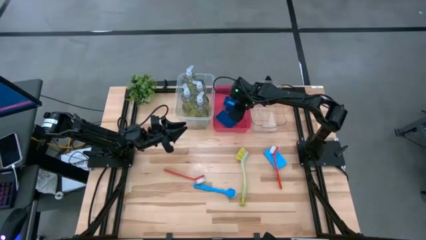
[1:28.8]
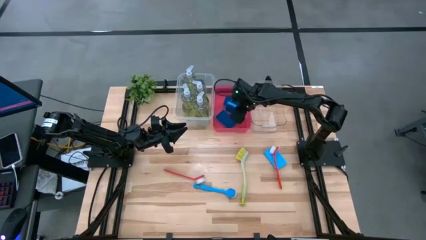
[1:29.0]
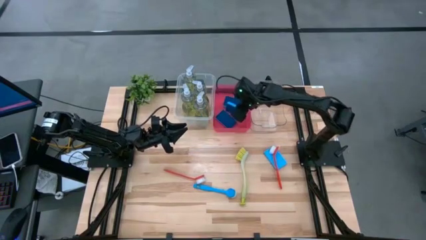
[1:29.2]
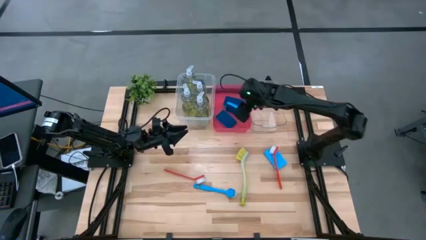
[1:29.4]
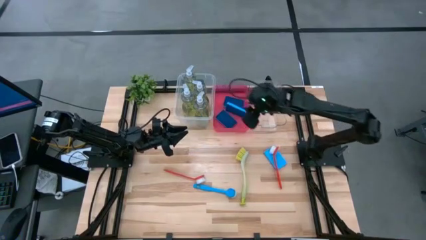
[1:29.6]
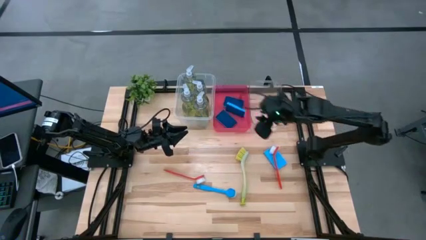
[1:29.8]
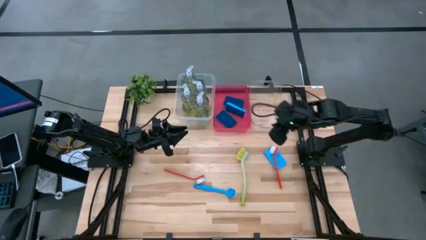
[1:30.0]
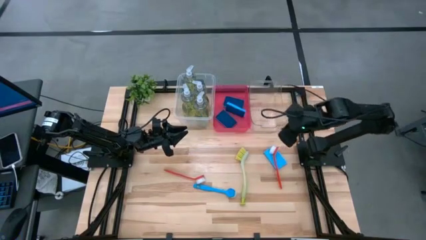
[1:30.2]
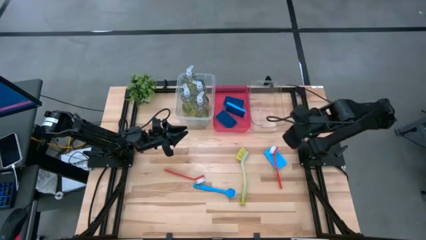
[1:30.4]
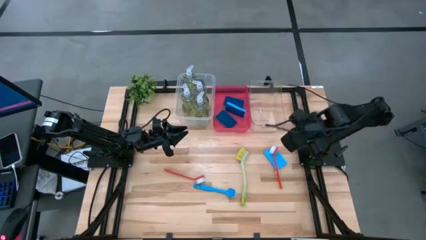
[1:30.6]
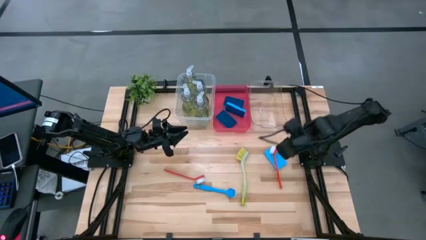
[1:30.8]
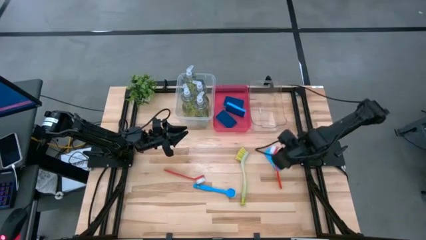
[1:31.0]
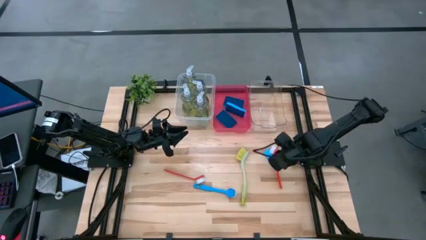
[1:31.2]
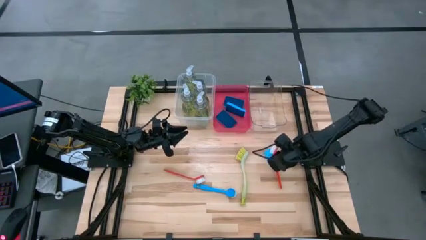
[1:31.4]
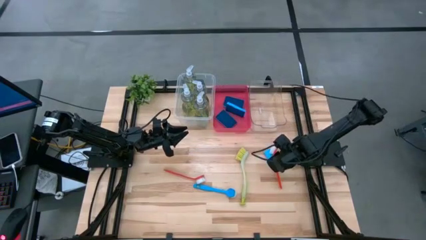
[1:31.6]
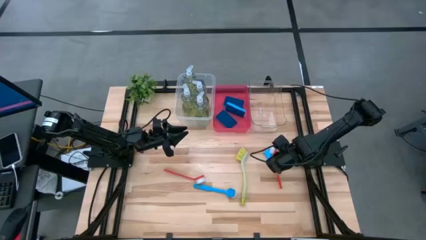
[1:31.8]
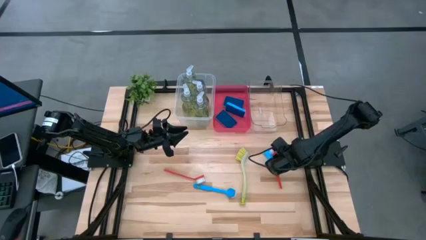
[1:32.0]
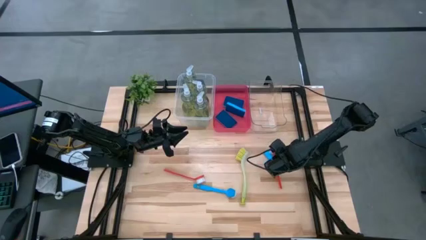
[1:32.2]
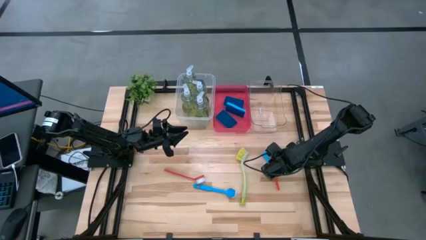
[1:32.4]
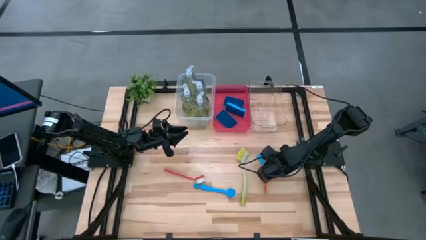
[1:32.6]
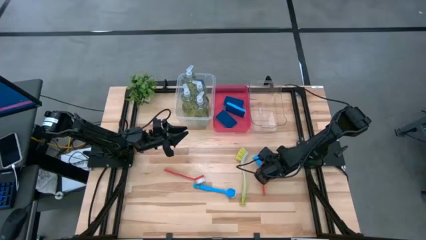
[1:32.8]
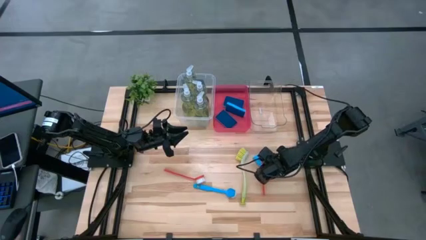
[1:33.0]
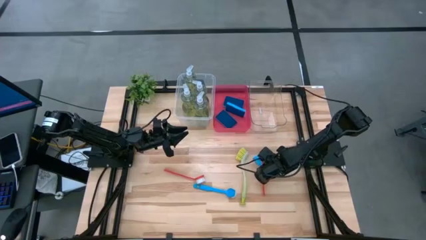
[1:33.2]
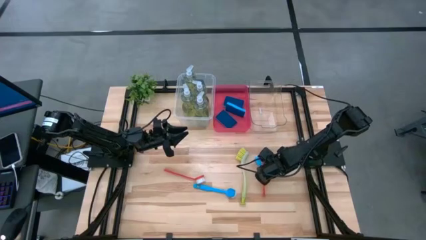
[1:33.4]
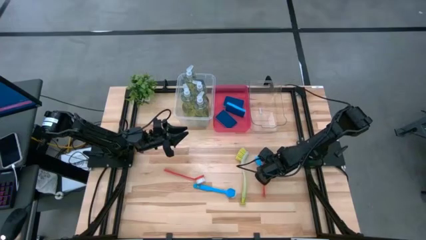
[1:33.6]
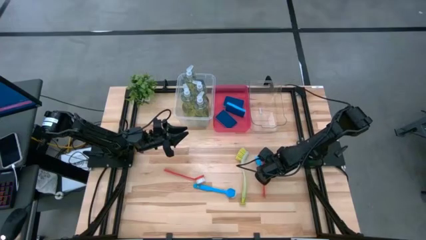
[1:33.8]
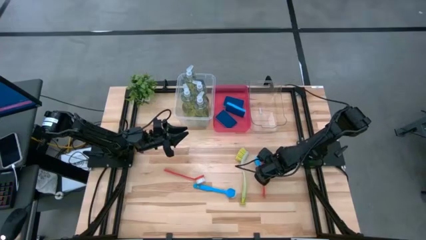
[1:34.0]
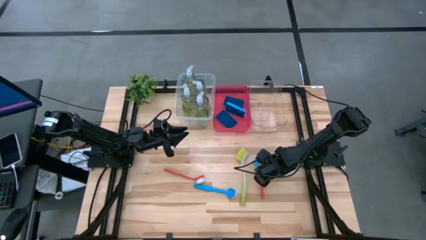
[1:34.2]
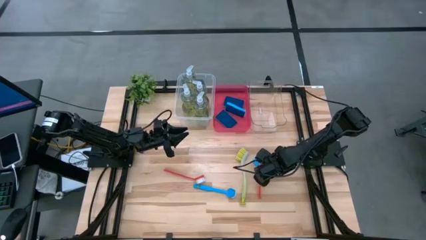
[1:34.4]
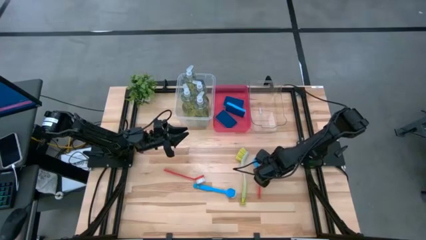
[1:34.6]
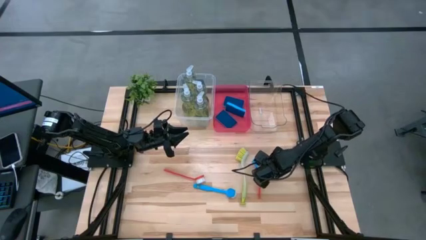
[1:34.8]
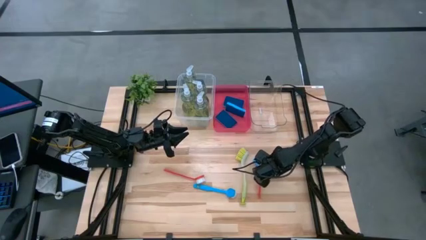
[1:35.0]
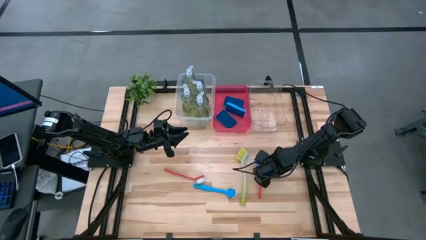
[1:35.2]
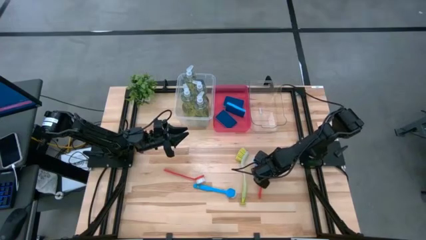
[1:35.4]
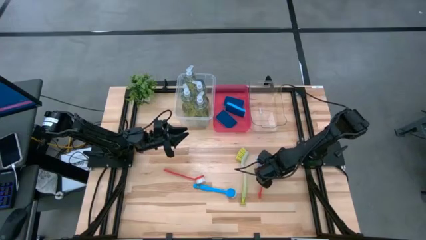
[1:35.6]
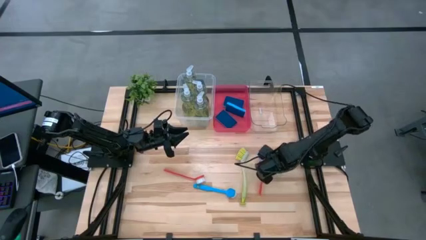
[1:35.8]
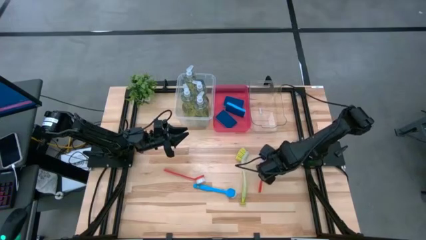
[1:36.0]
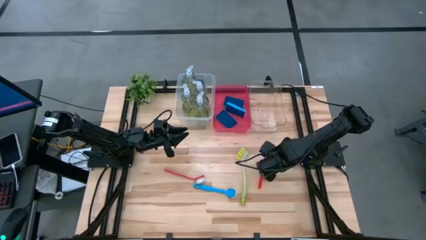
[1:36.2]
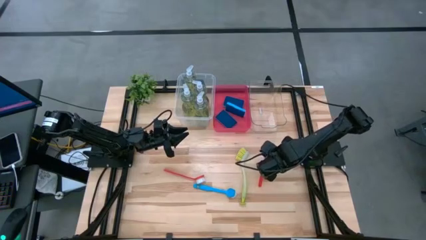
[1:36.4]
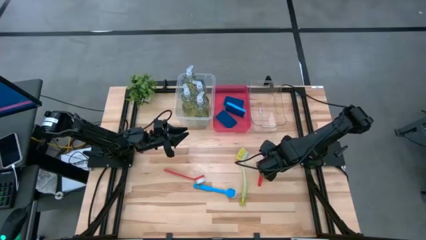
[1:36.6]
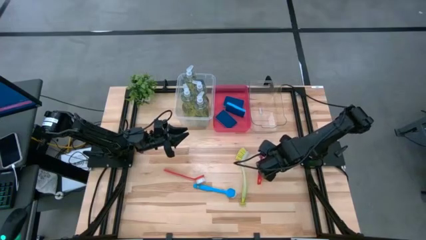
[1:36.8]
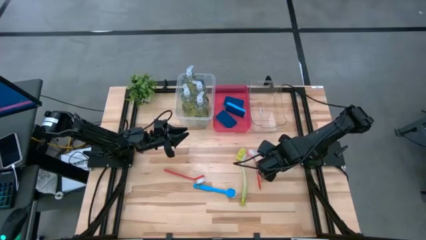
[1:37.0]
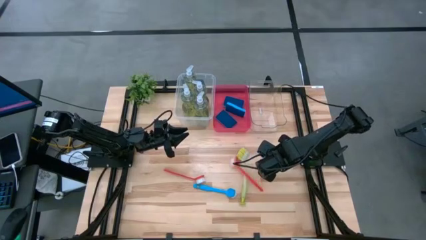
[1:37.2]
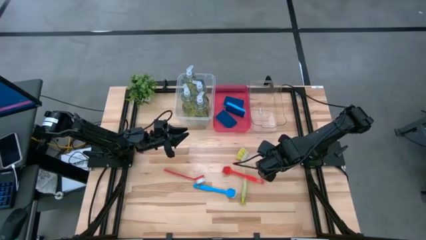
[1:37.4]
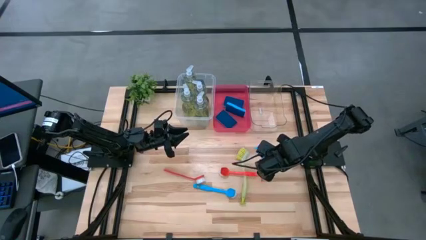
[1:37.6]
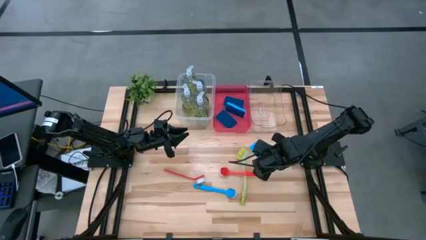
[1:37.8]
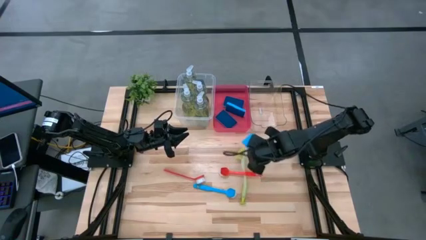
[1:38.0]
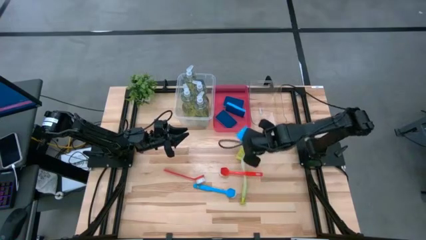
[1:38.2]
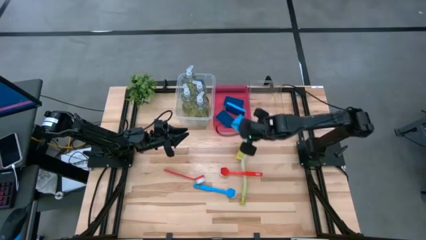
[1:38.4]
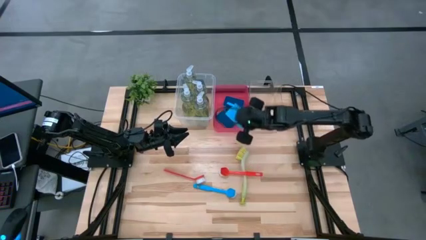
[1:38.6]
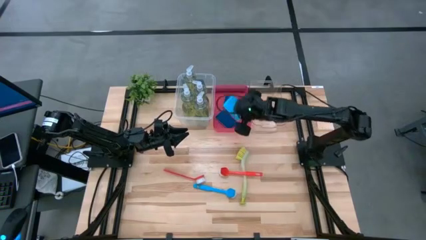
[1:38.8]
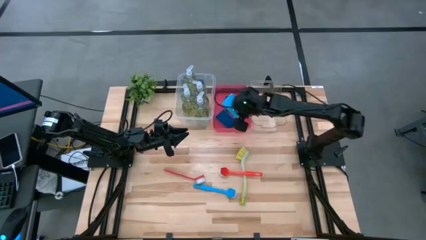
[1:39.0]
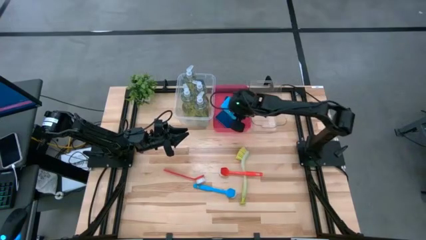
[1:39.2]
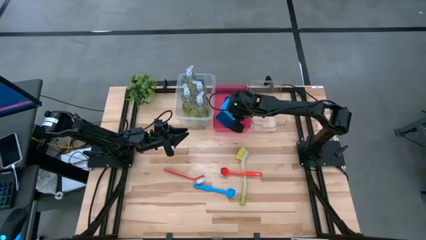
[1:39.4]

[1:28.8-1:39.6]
Task: Pick & Place Kitchen Sink Supplies
Put the blue sponge into the red bin

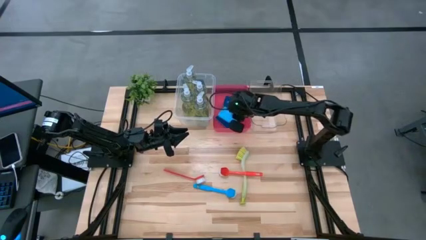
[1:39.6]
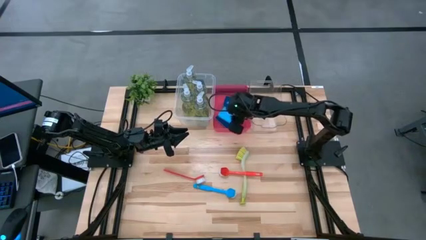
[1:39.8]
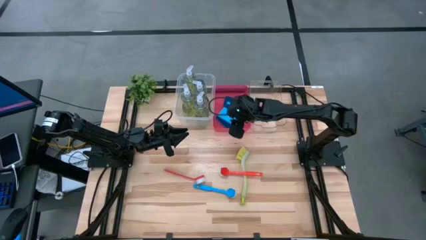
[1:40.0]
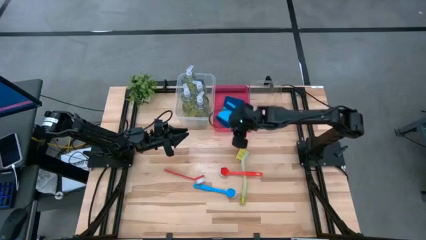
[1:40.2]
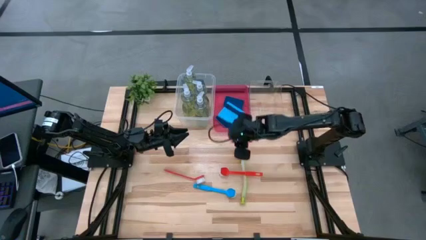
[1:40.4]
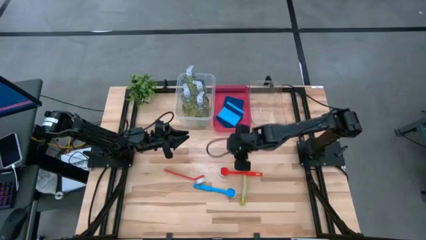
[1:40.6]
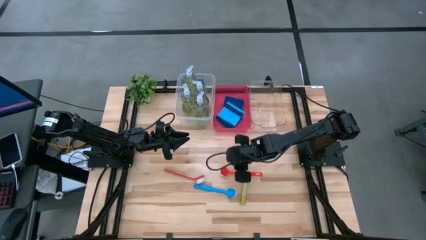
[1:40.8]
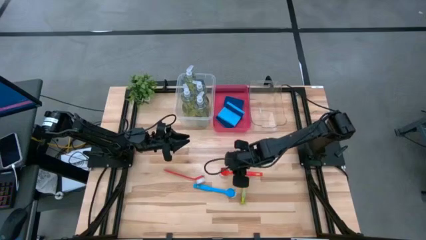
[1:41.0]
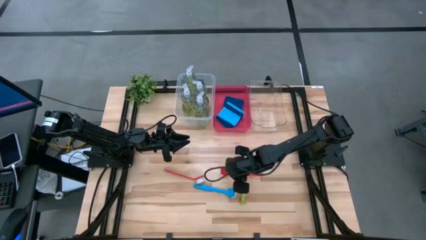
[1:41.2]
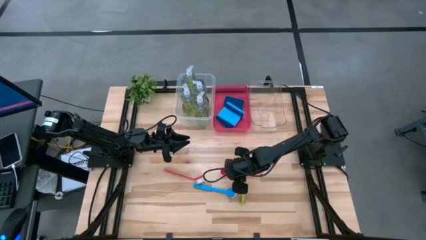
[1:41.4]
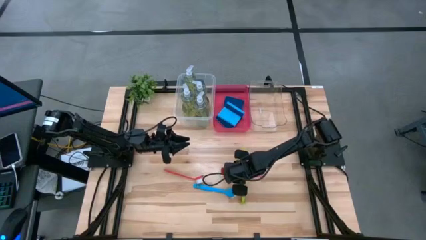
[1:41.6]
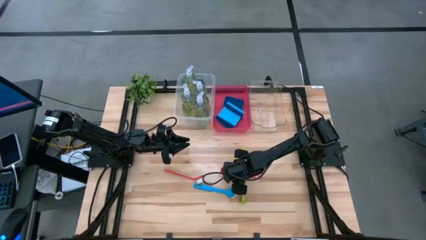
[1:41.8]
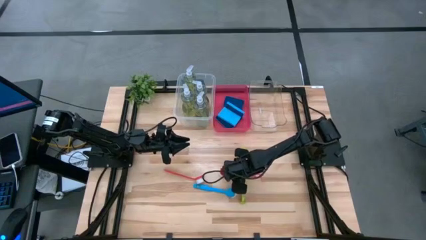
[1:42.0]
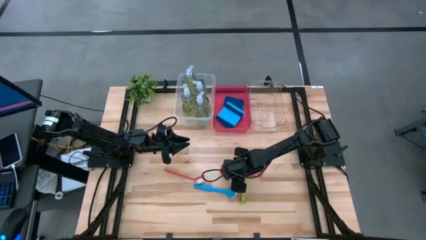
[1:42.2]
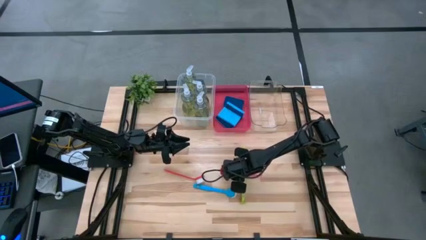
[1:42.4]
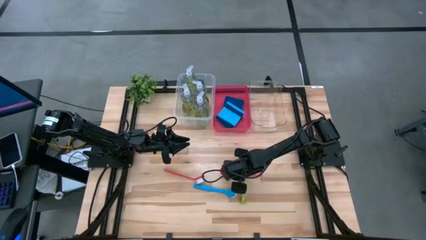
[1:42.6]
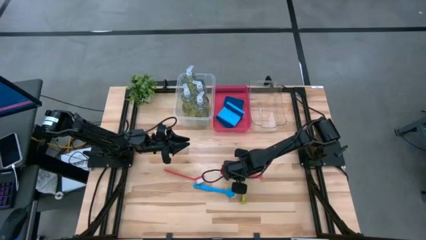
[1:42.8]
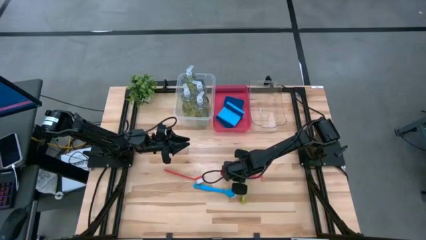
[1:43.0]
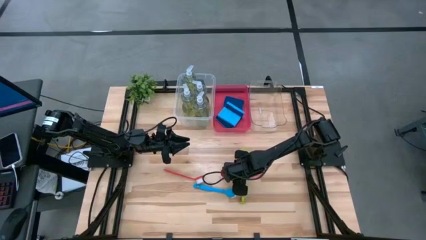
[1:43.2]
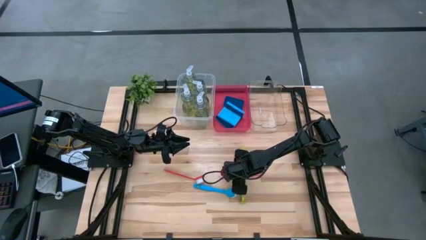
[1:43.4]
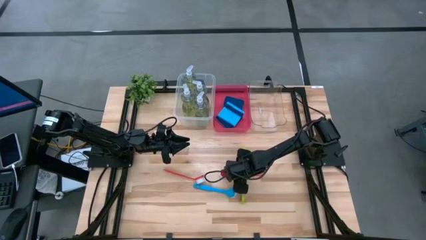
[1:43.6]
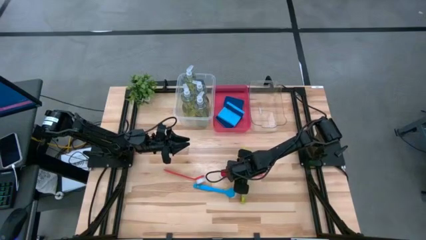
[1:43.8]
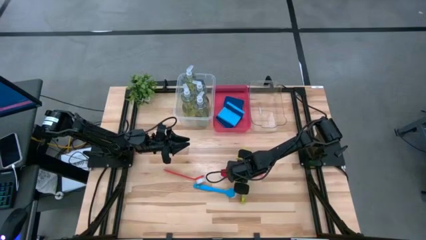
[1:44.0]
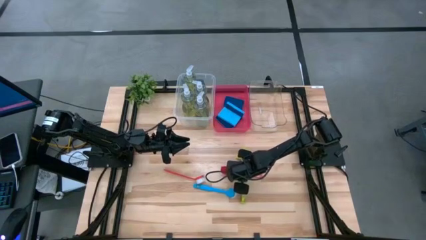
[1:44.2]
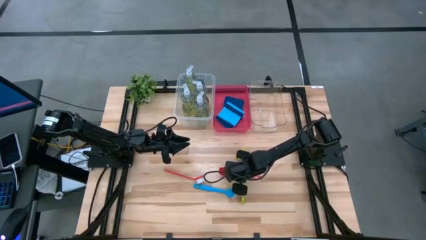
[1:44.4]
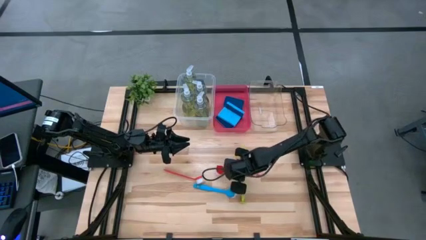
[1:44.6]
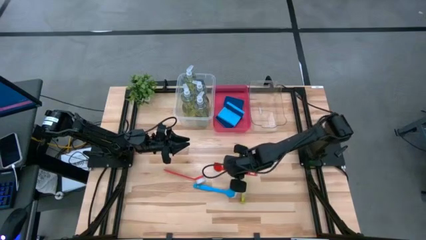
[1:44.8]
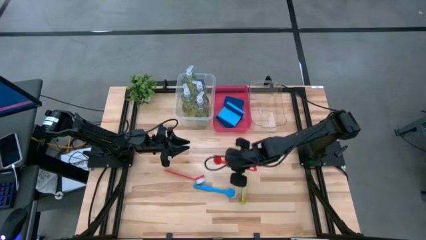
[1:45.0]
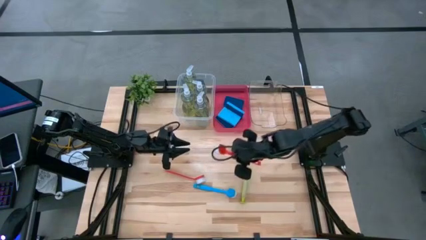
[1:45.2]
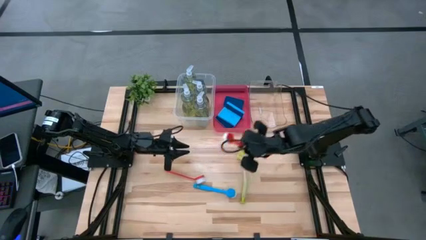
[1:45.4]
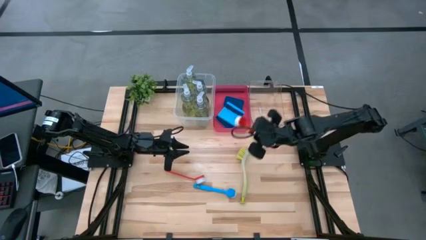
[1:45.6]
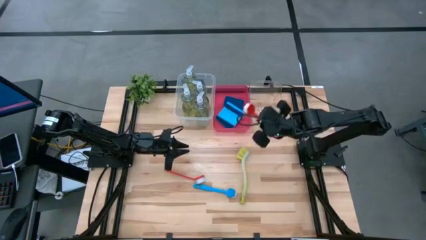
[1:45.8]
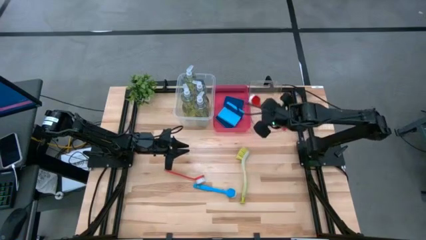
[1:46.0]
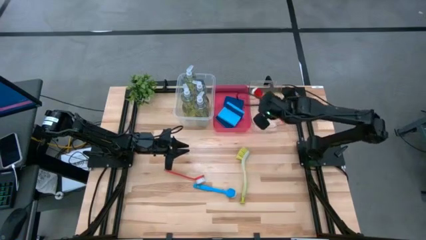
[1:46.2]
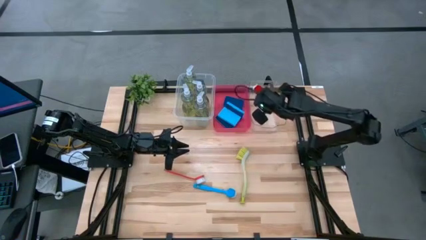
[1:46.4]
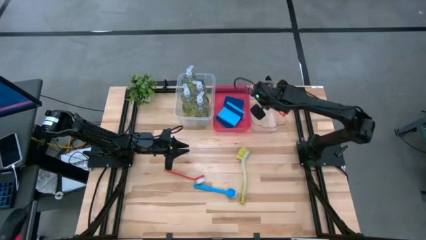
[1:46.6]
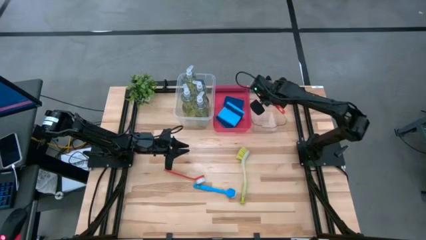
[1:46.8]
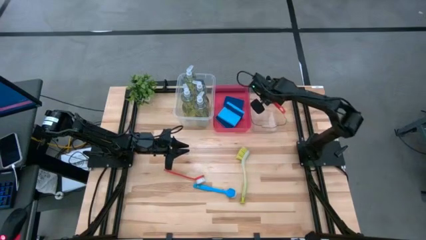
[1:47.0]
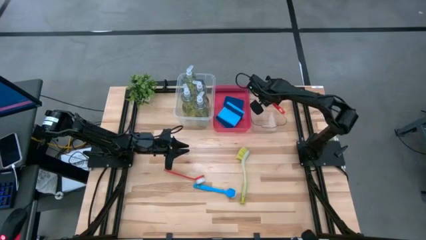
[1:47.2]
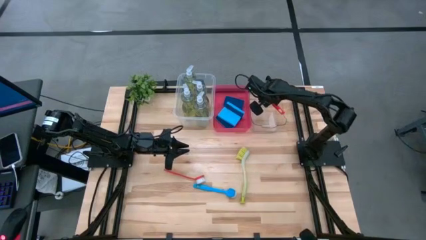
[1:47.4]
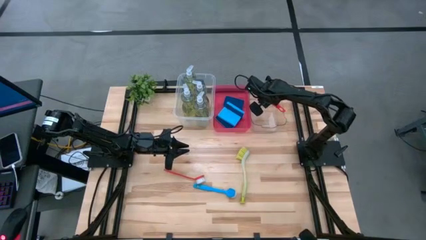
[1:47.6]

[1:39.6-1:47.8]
Put the red dish brush into the transparent bin
